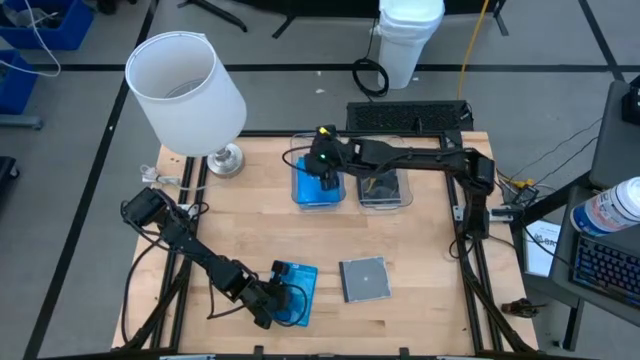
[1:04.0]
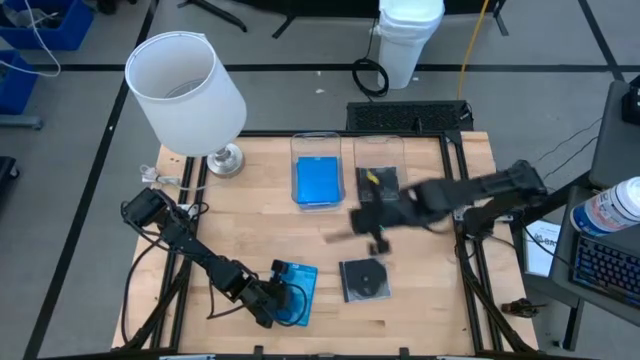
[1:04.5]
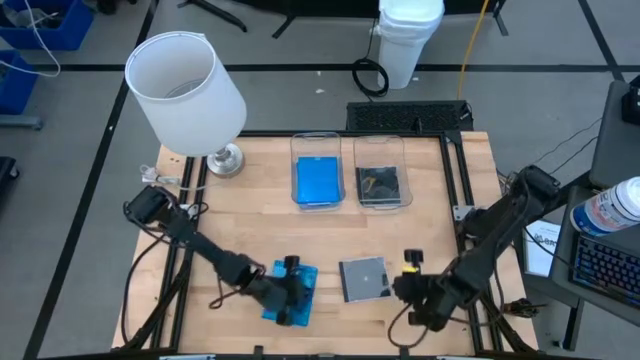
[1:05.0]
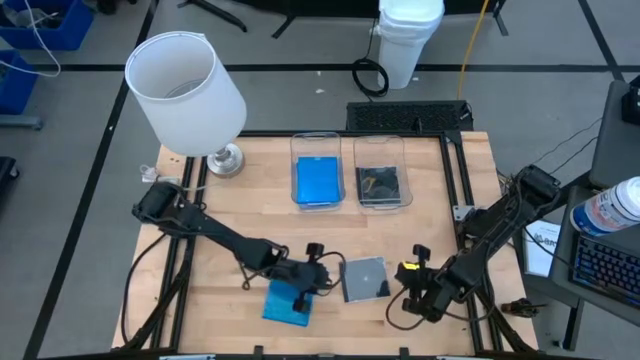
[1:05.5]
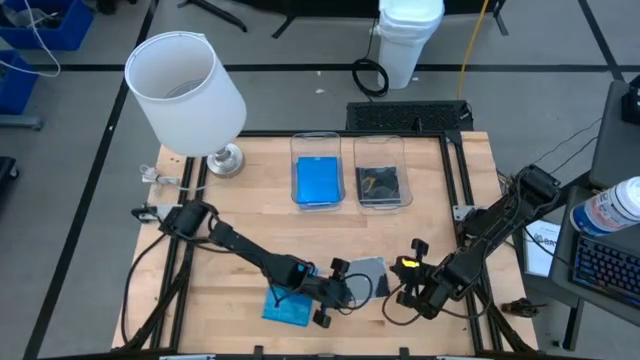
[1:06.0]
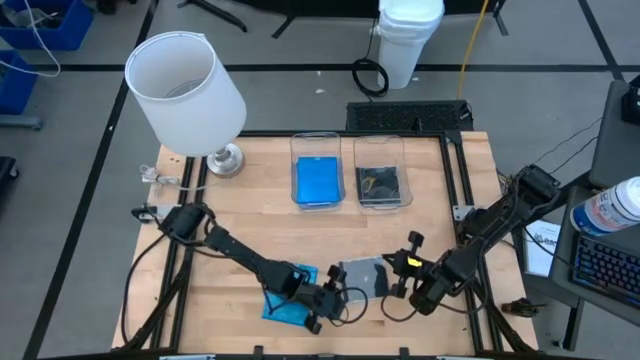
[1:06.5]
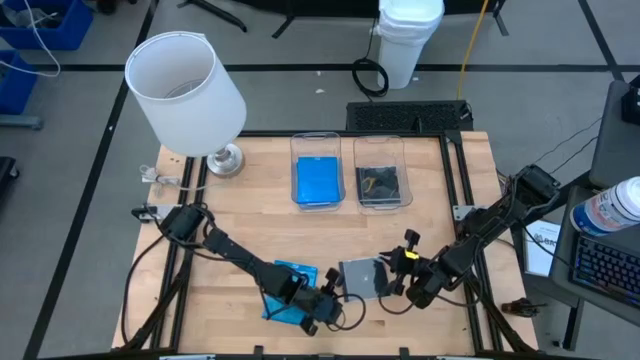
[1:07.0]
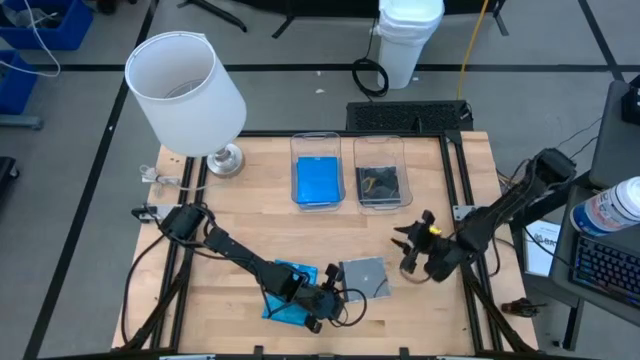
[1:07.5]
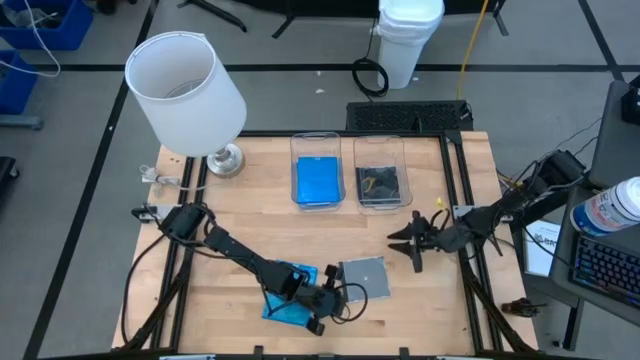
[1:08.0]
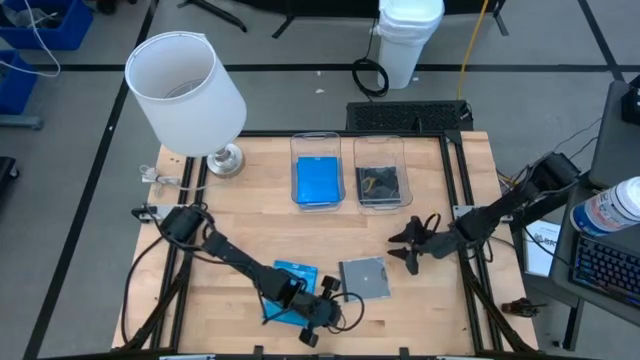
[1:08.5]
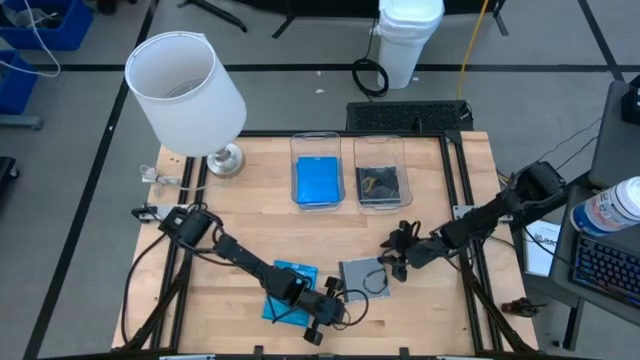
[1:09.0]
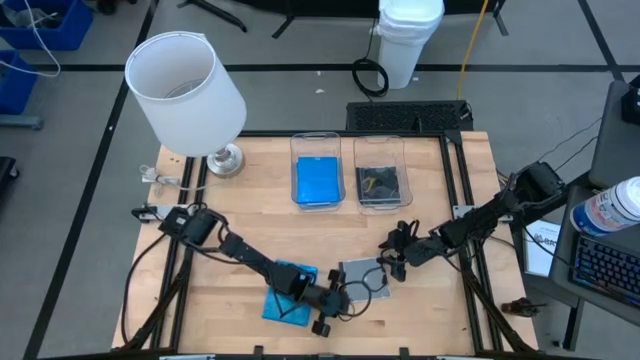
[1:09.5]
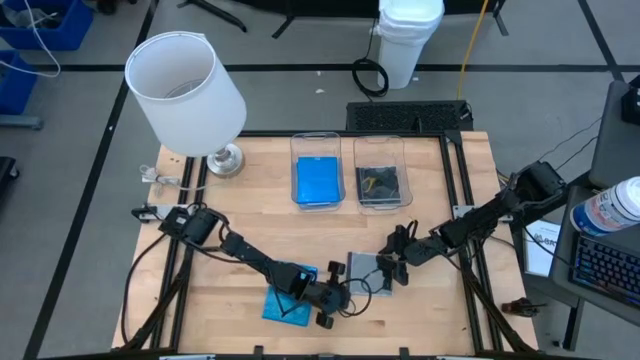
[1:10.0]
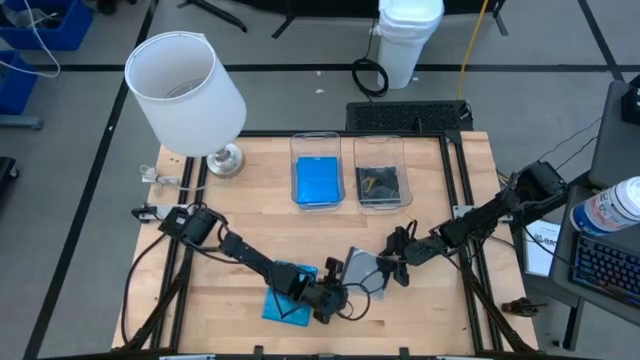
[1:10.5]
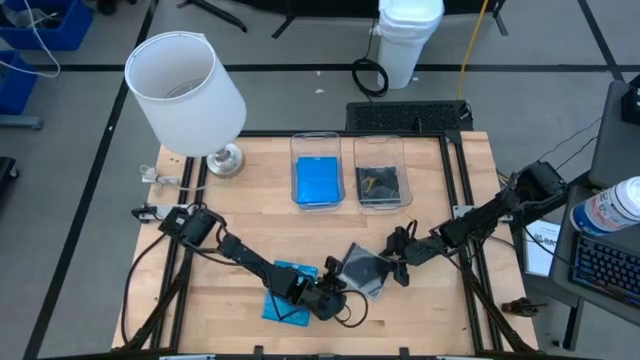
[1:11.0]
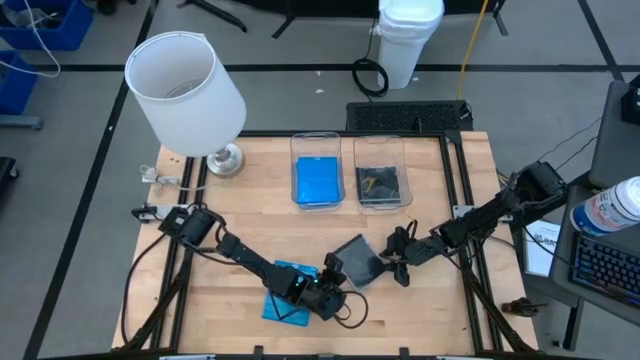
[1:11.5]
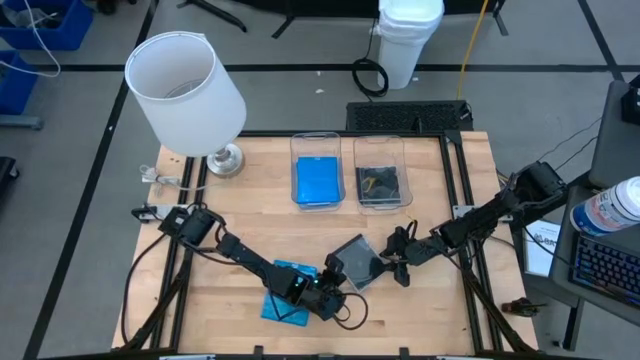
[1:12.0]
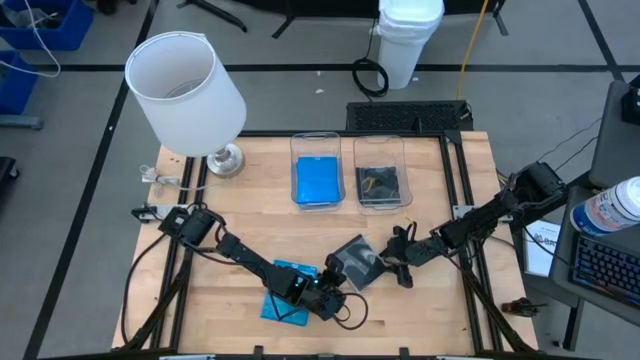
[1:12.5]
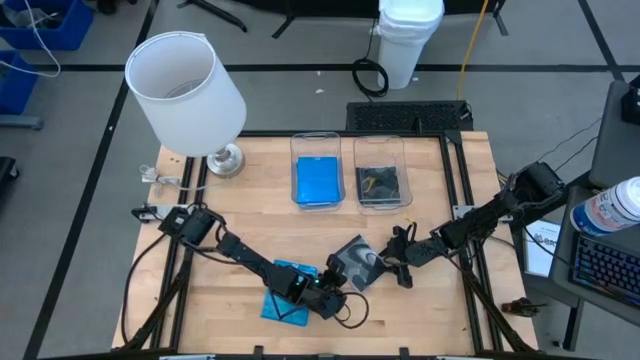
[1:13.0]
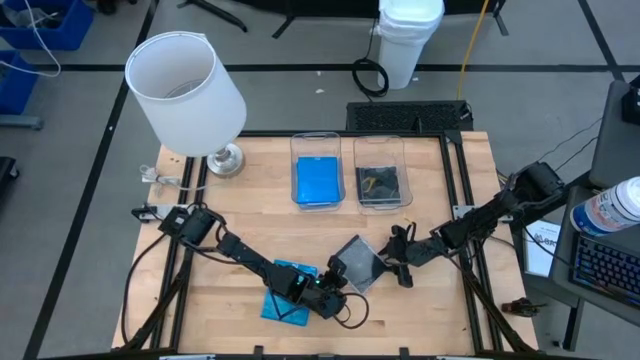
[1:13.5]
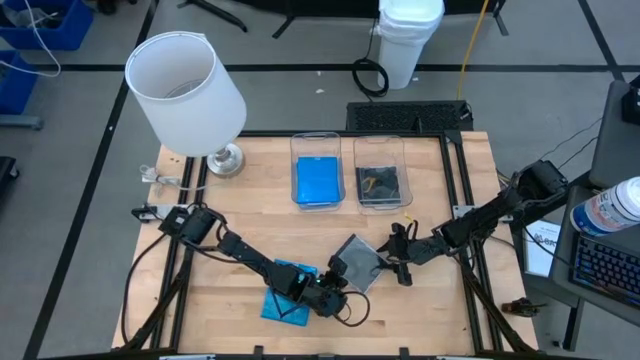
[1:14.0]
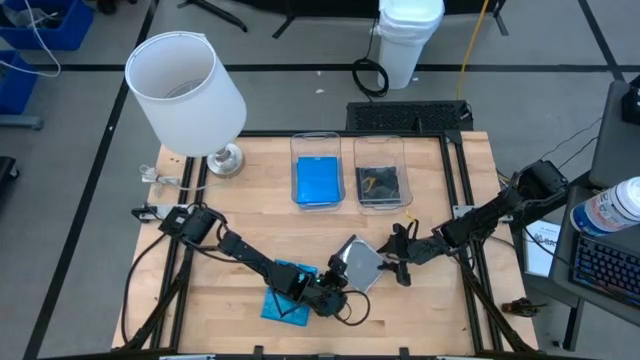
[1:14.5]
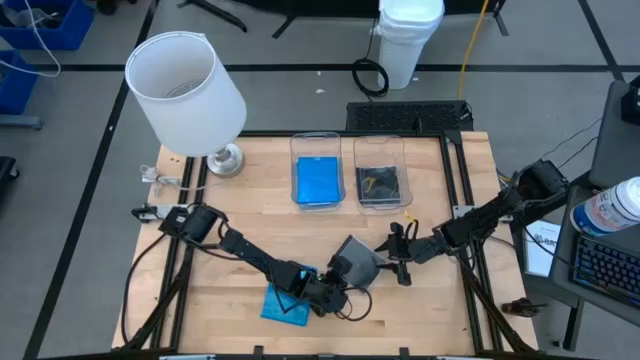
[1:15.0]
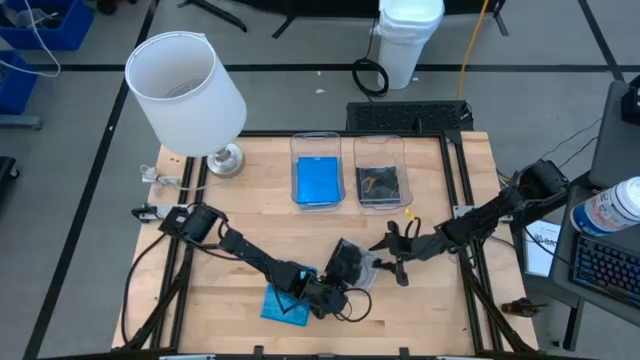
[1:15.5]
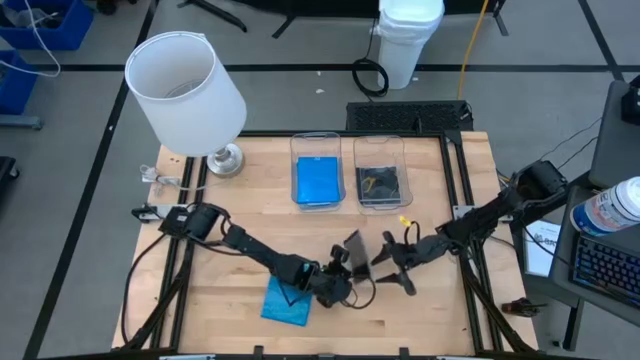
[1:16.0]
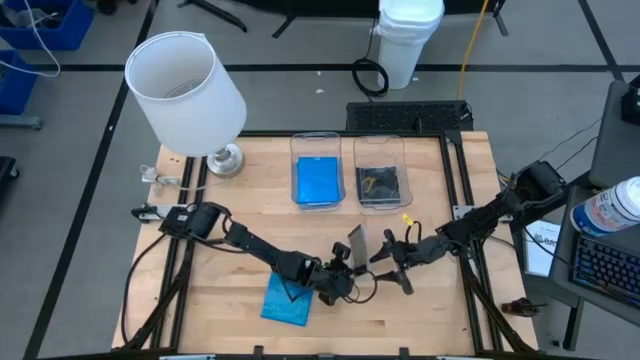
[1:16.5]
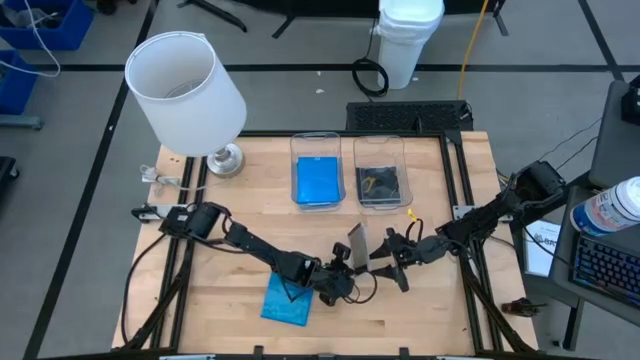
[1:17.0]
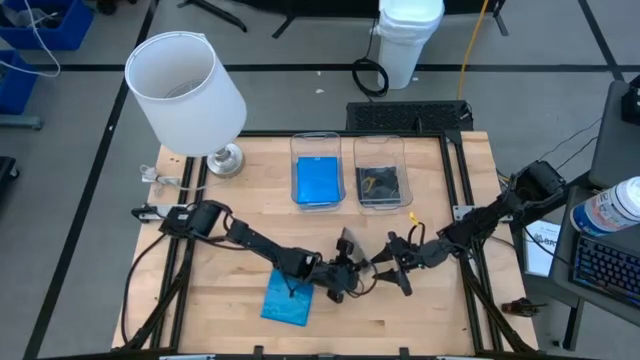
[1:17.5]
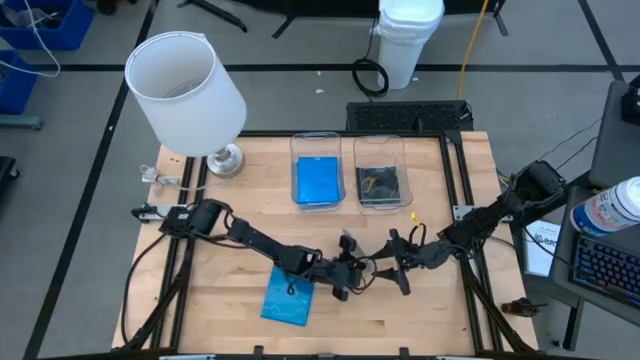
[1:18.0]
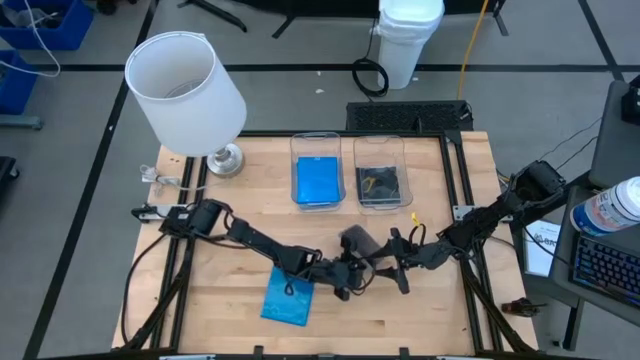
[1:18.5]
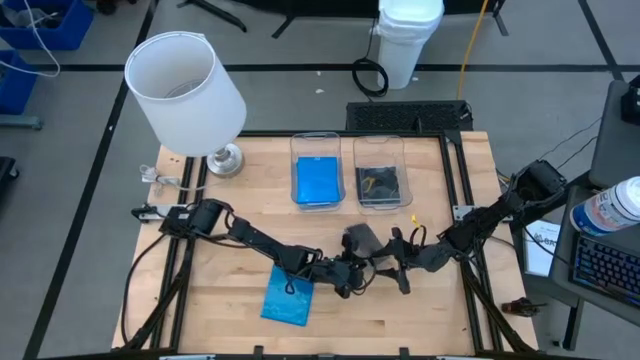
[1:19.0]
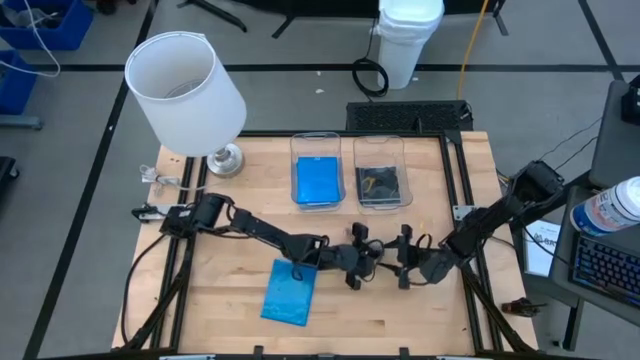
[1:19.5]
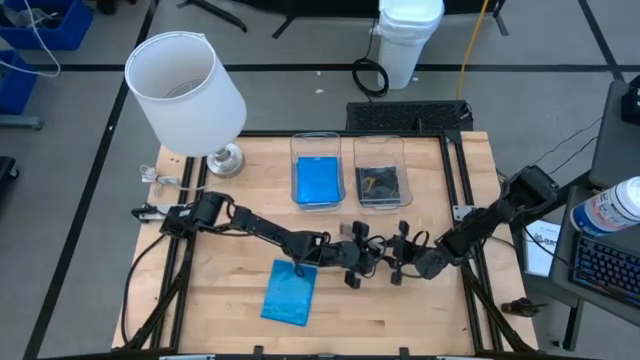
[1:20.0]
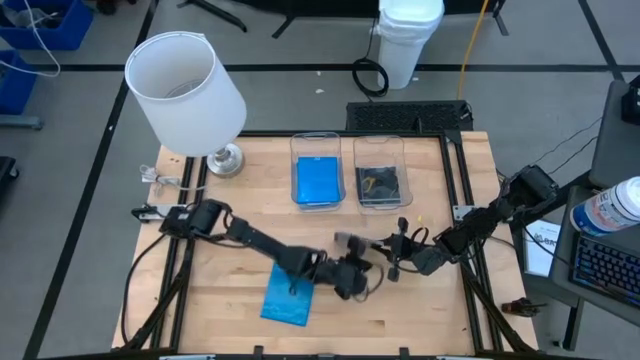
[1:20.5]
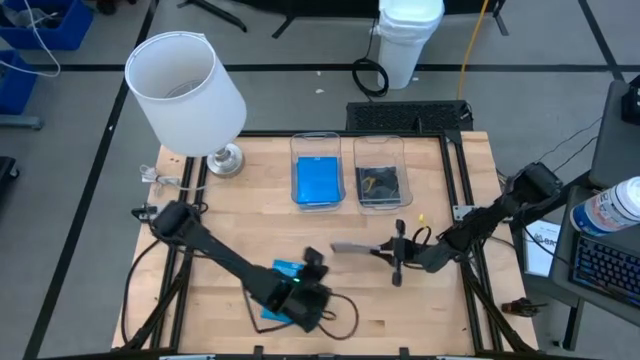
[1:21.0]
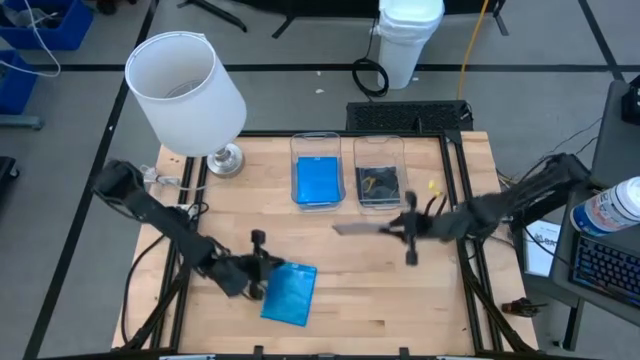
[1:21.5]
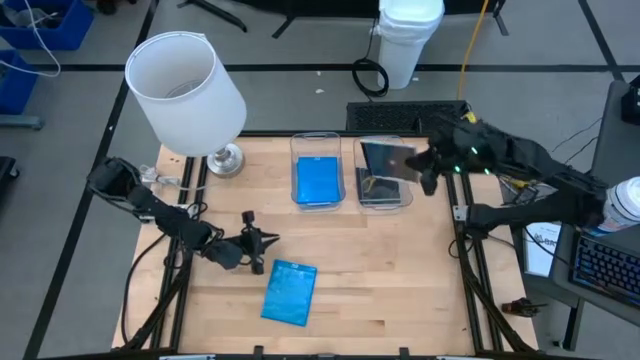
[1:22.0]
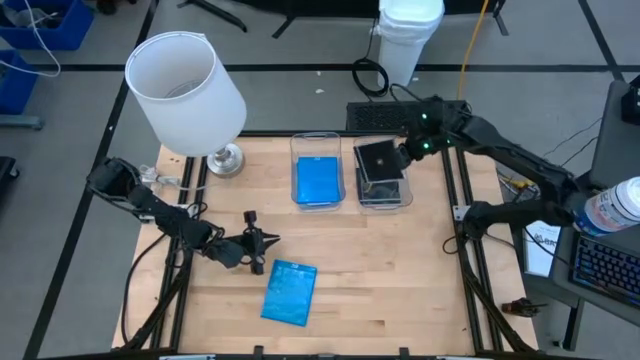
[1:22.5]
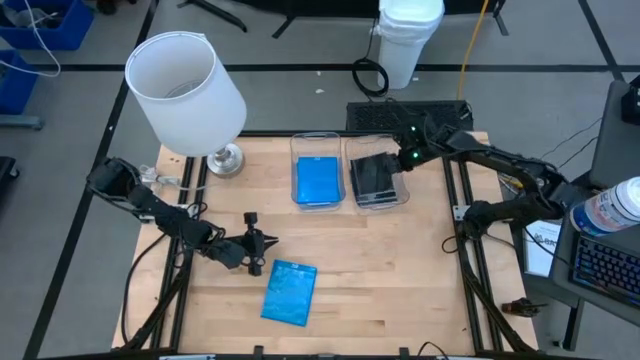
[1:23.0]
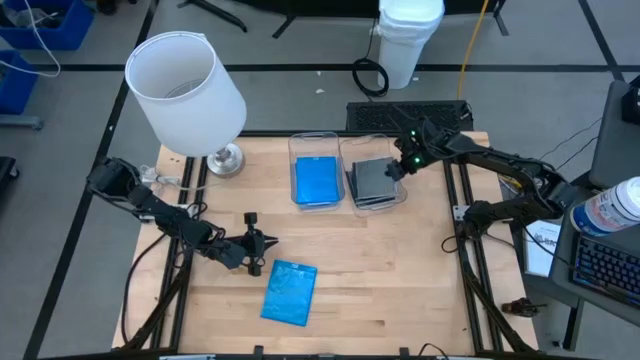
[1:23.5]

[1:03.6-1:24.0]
Task: Pick & place jewel cases by type
Put the black CD case into the right transparent bin

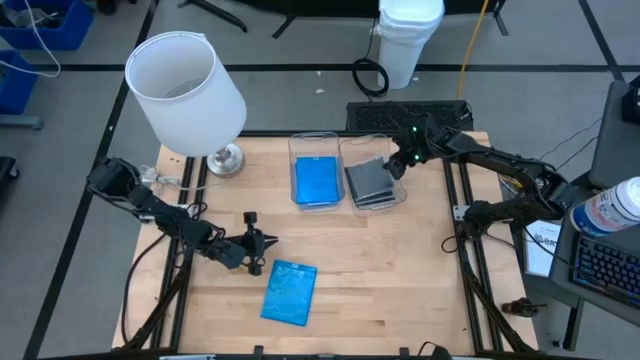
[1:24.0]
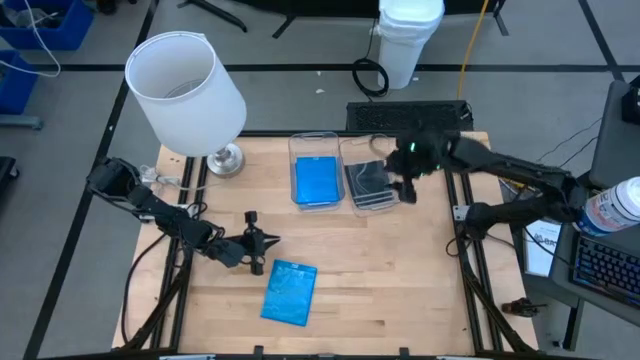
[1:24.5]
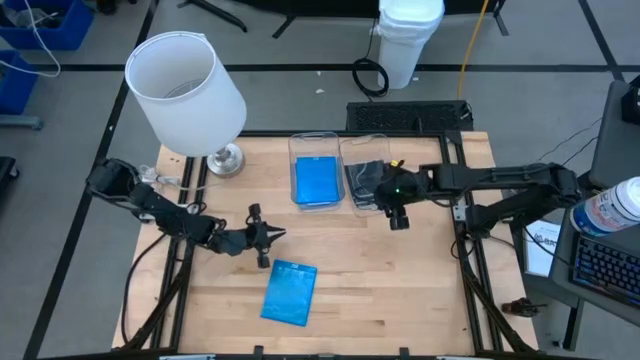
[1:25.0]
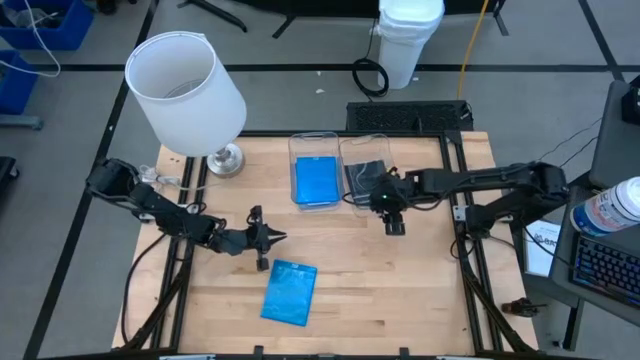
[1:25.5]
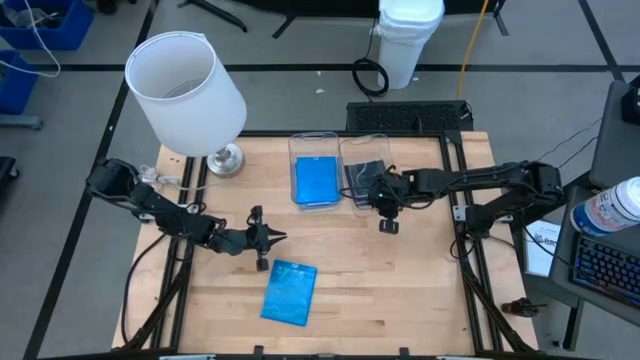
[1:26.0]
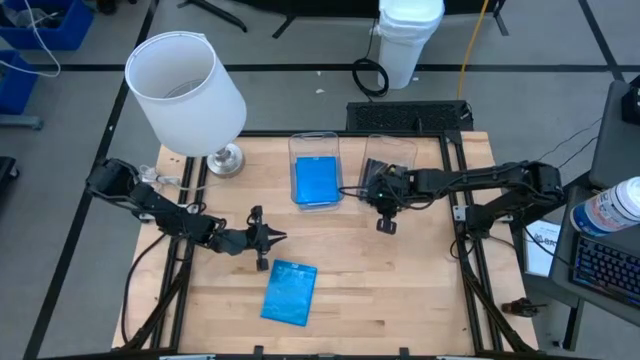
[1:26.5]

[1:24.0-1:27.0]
Adjust the right transparent bin
